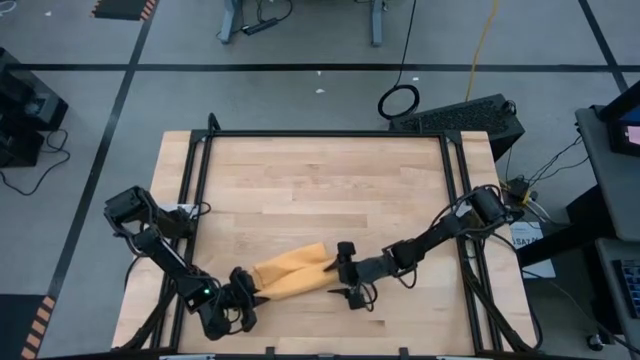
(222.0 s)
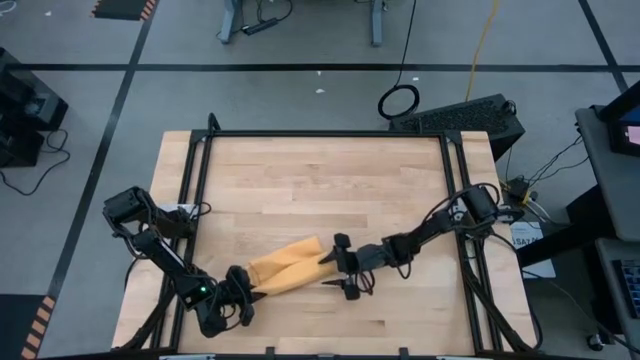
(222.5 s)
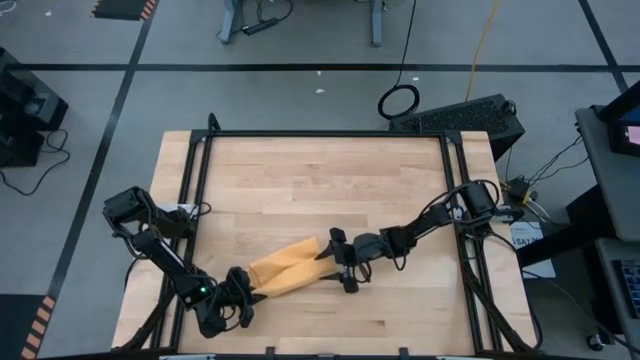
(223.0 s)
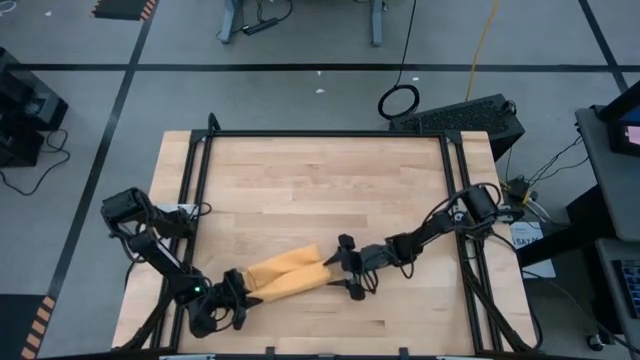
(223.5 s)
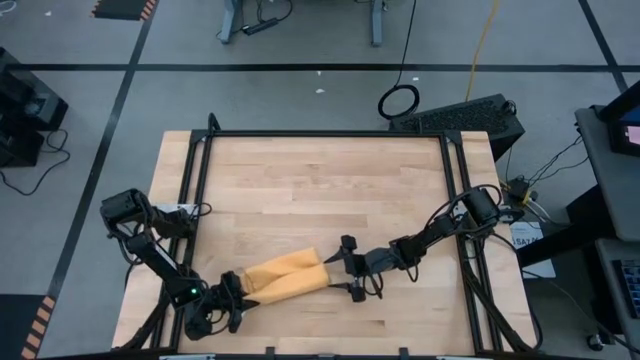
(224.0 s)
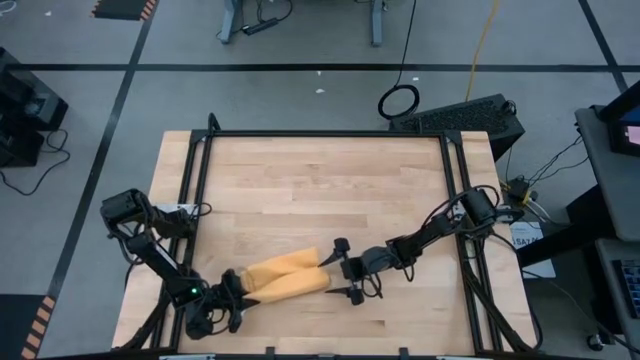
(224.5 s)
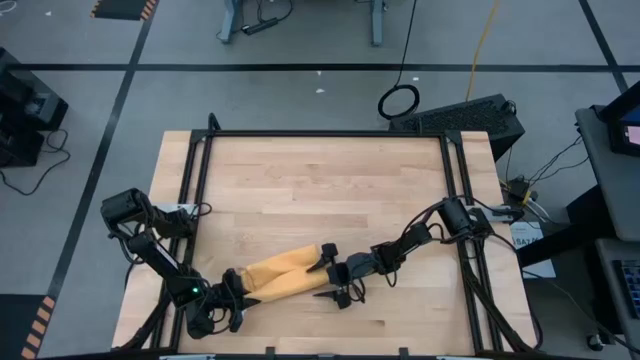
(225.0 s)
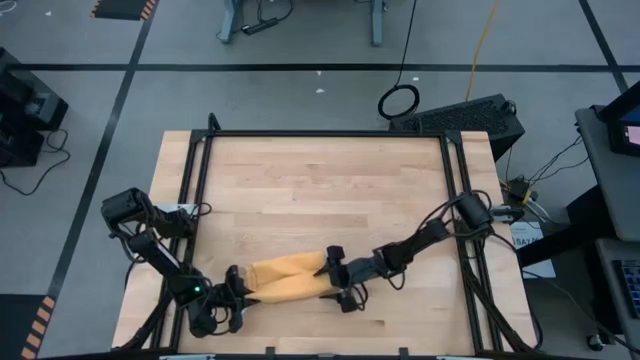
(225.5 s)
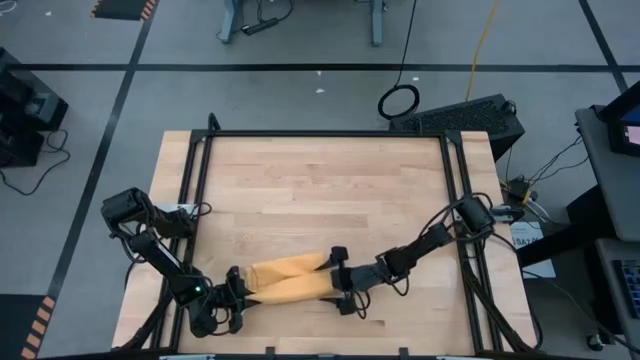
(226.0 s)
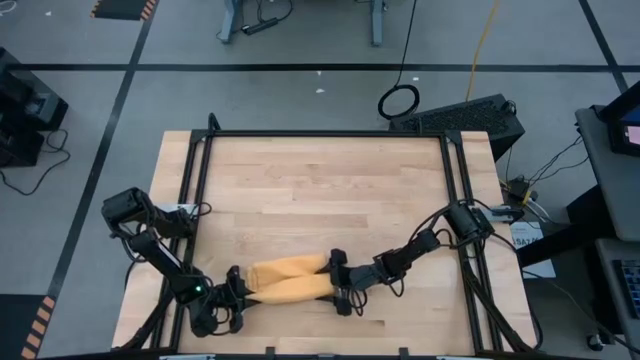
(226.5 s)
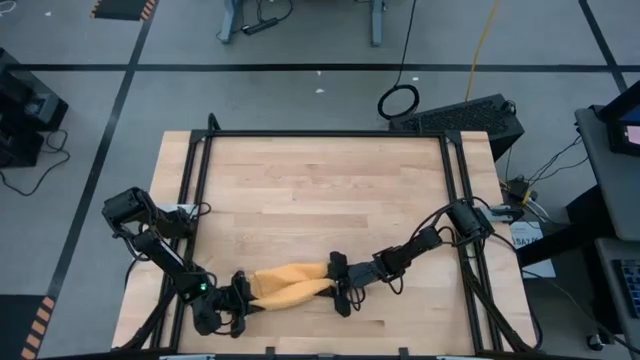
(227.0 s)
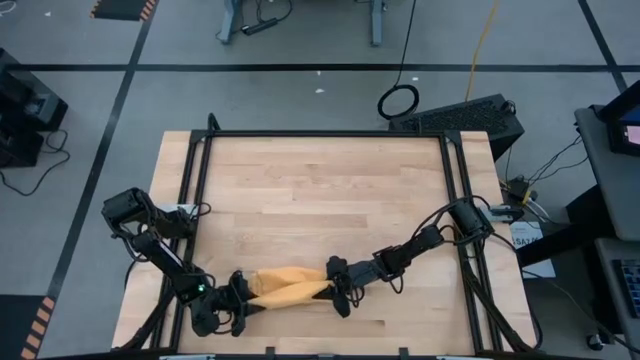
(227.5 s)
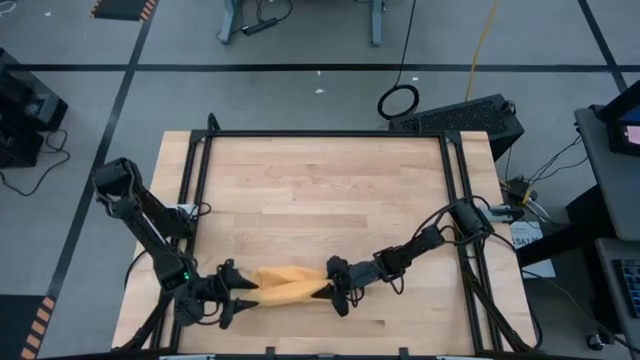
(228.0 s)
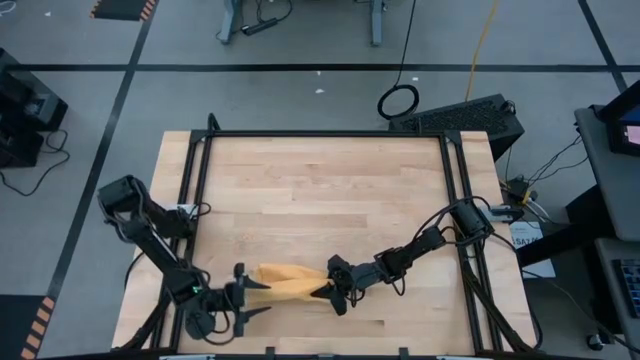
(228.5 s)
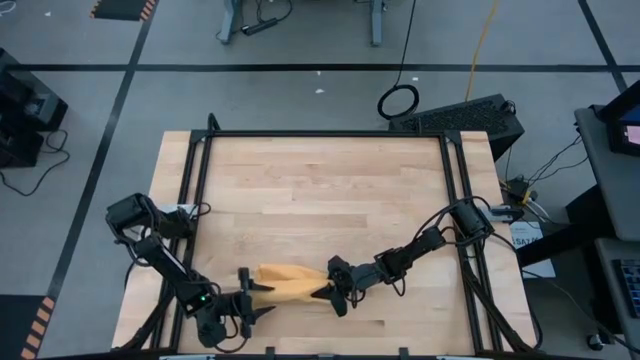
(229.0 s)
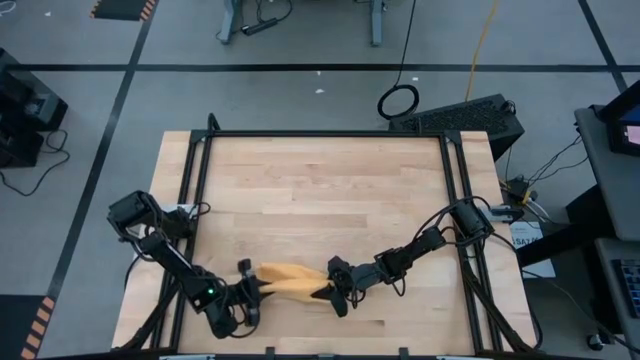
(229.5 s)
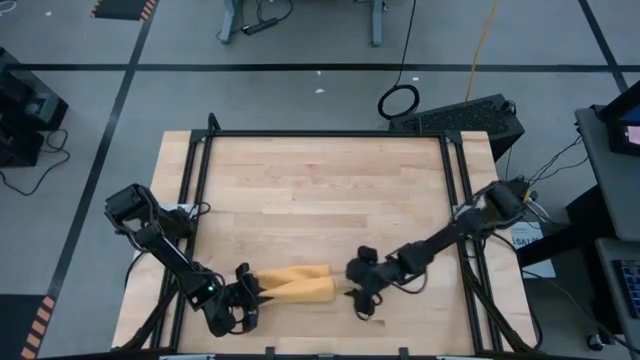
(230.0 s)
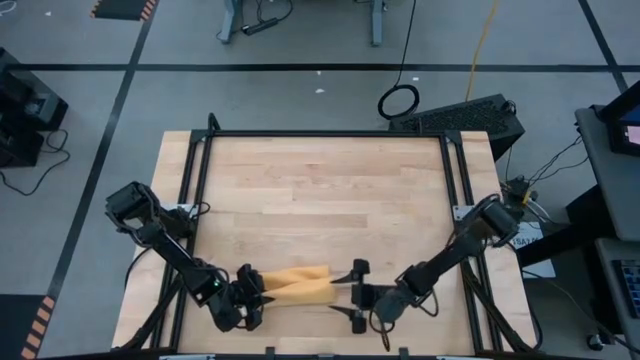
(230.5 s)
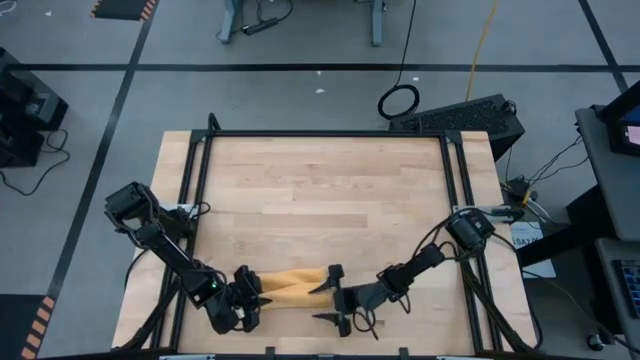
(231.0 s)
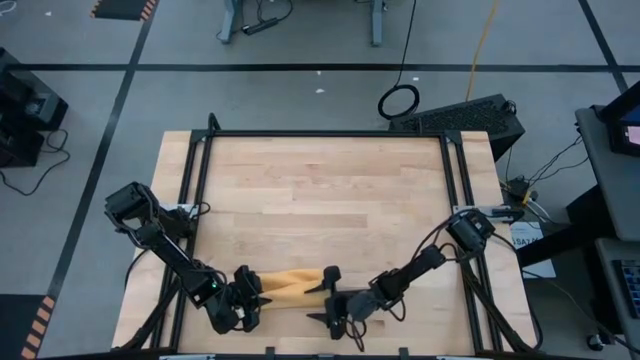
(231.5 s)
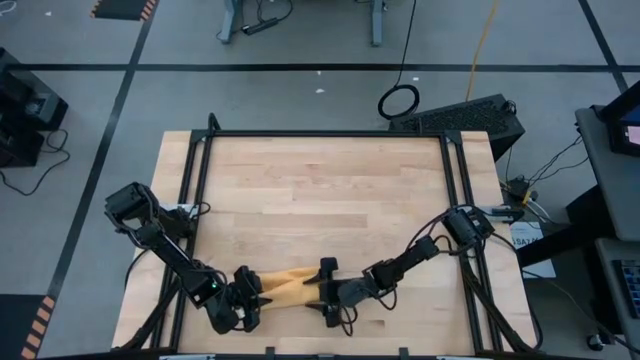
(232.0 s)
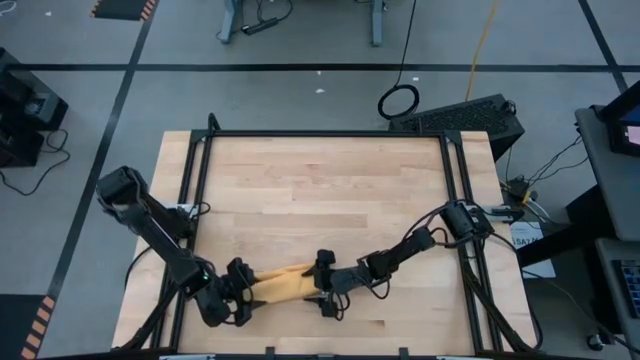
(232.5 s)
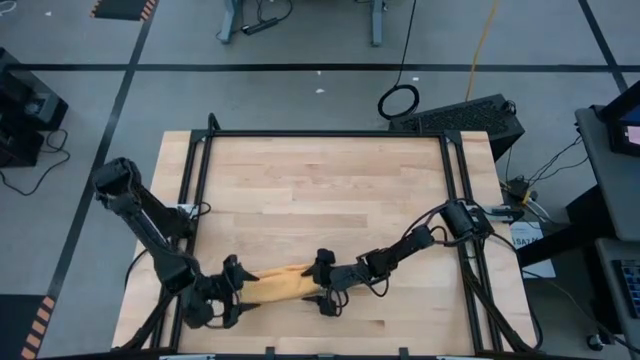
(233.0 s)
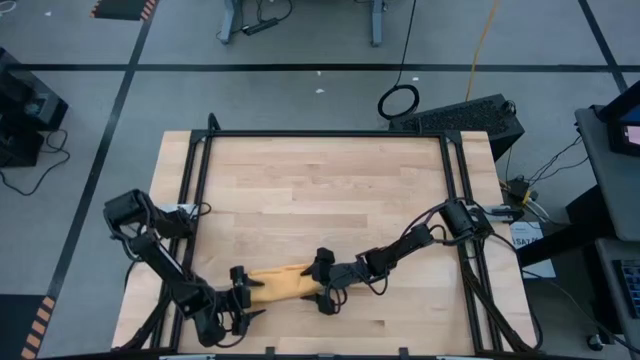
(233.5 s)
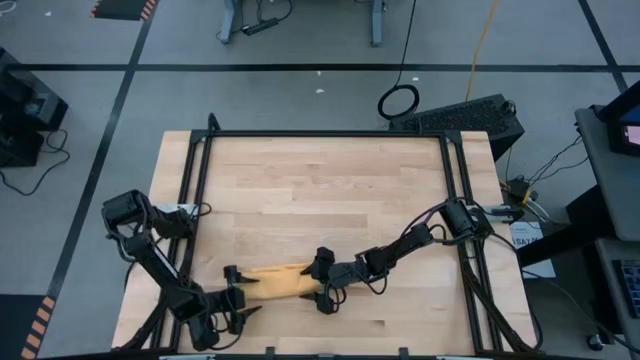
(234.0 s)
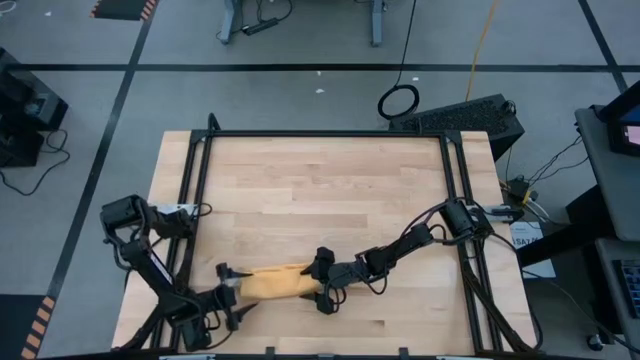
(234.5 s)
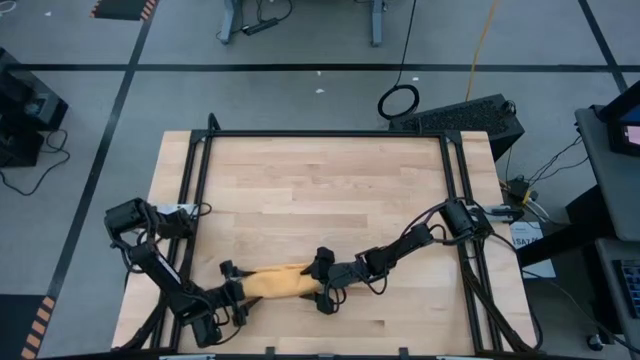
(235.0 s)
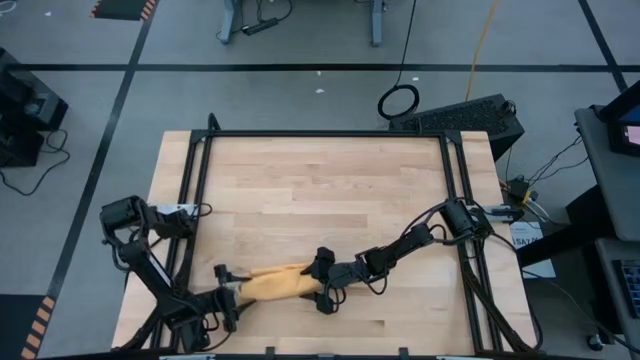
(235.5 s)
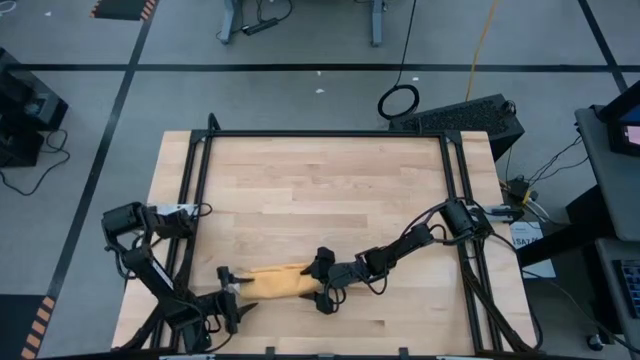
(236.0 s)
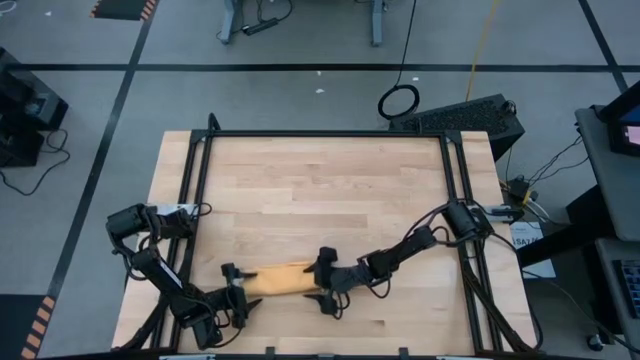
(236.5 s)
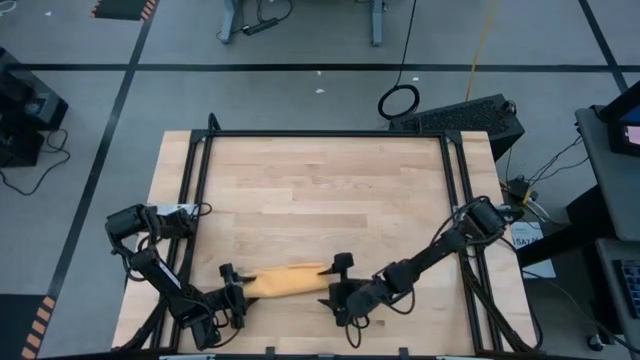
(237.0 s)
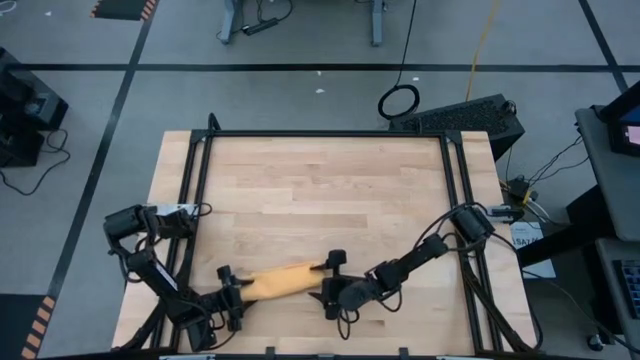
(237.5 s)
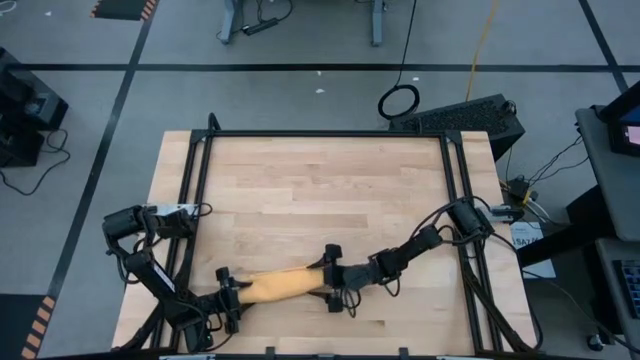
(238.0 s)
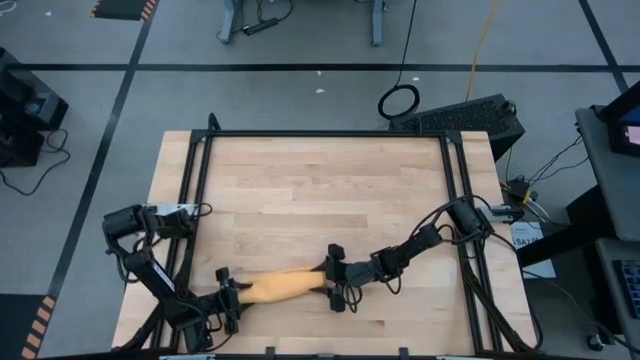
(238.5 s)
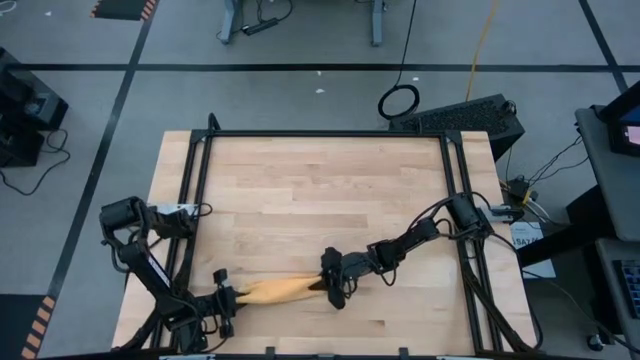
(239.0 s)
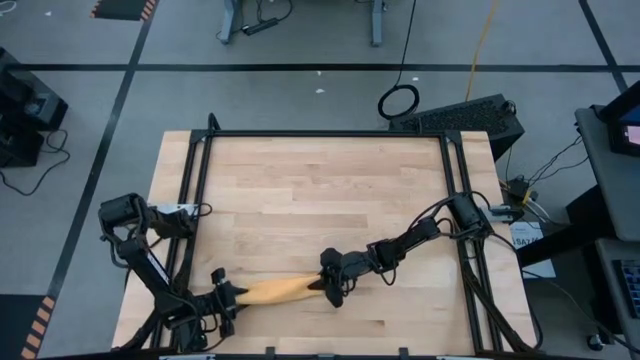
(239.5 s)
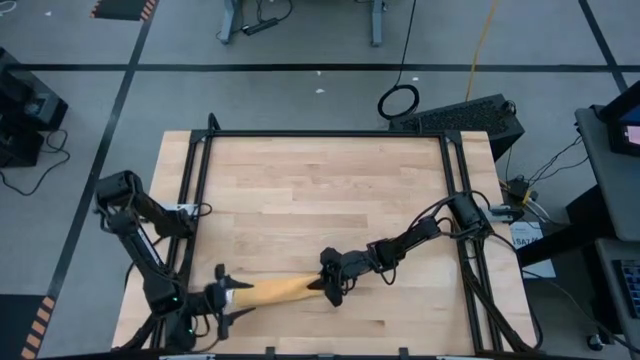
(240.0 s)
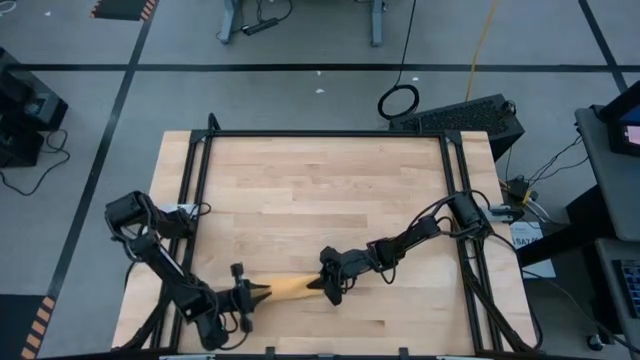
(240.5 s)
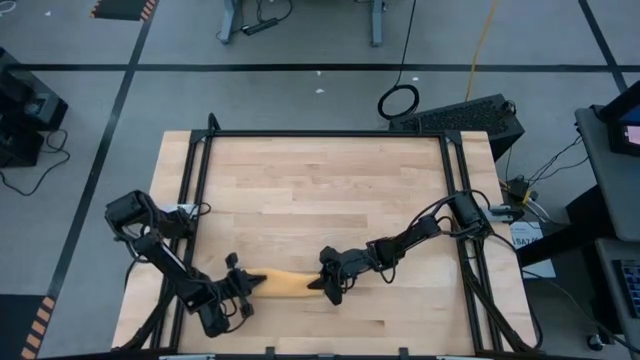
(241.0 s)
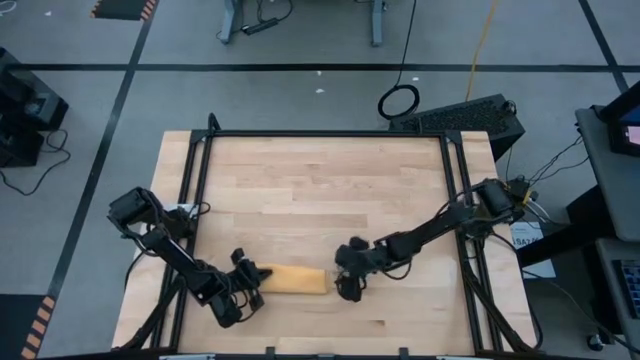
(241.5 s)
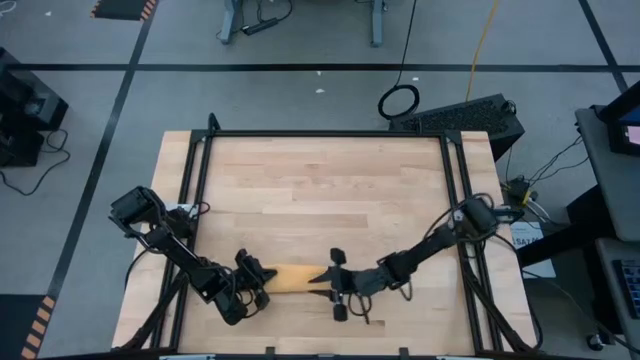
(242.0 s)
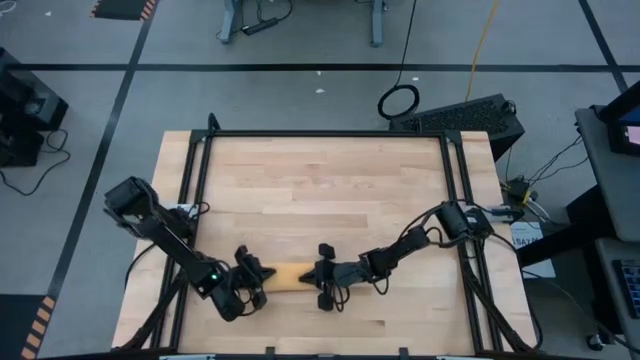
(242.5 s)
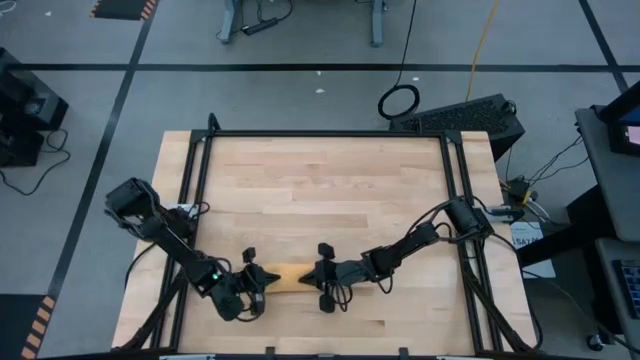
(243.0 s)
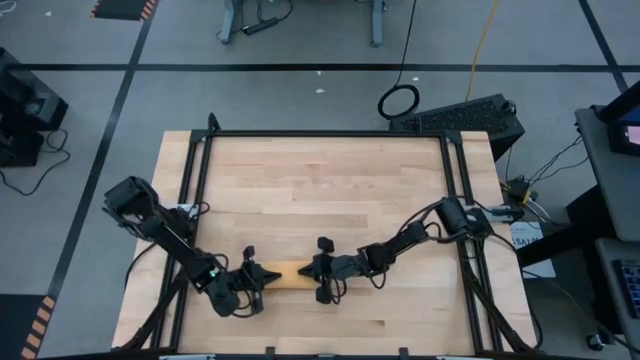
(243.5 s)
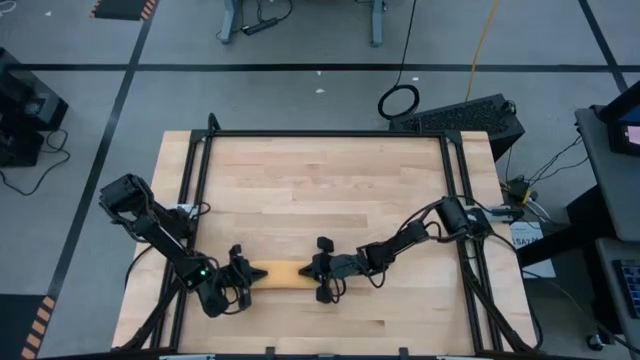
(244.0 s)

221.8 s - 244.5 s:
Task: Roll towel
Roll the folded yellow towel
